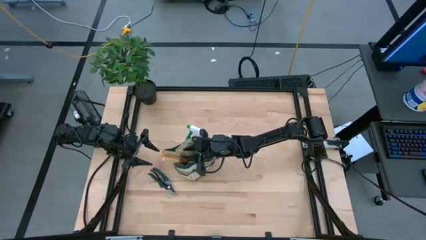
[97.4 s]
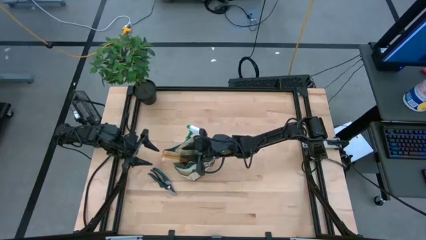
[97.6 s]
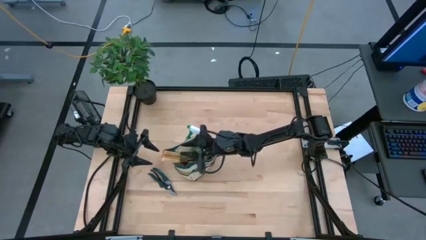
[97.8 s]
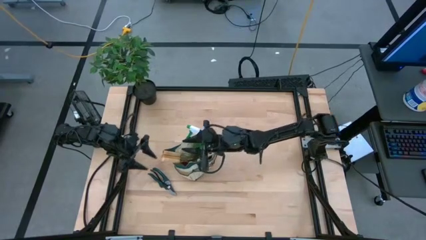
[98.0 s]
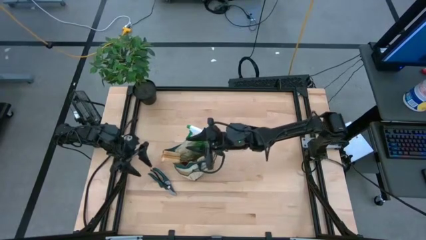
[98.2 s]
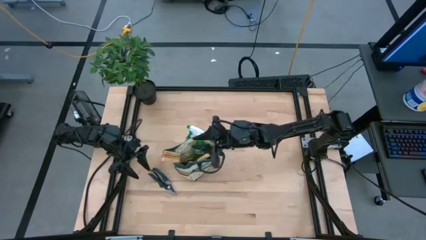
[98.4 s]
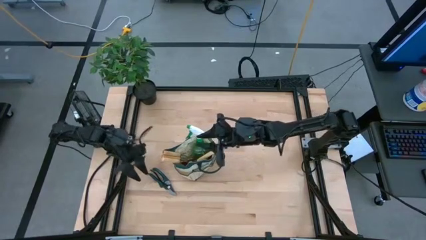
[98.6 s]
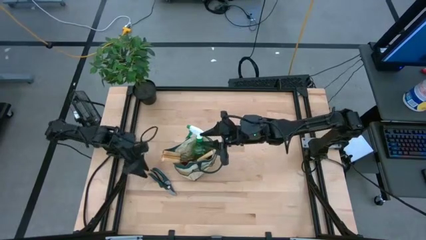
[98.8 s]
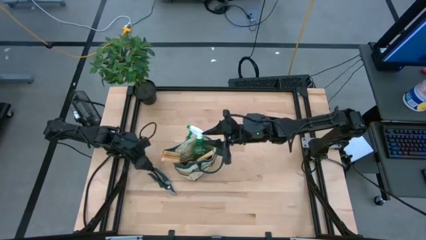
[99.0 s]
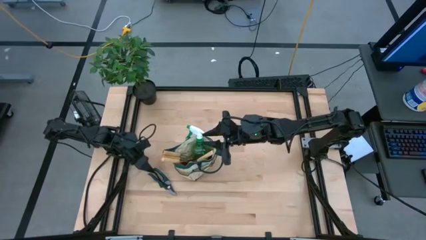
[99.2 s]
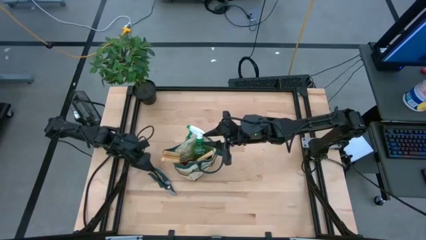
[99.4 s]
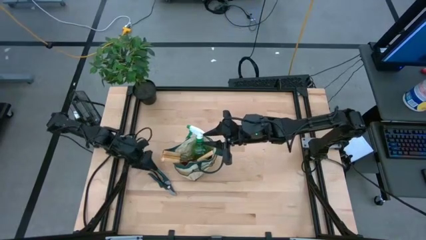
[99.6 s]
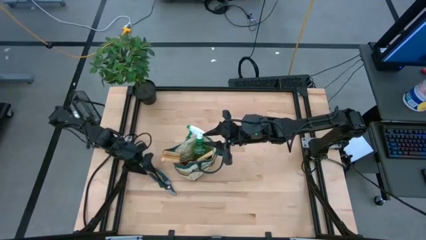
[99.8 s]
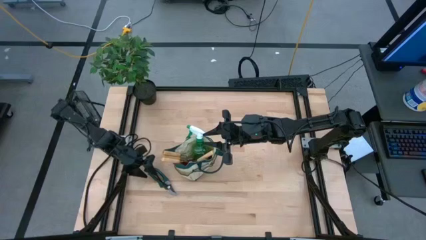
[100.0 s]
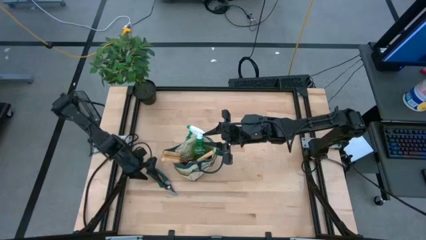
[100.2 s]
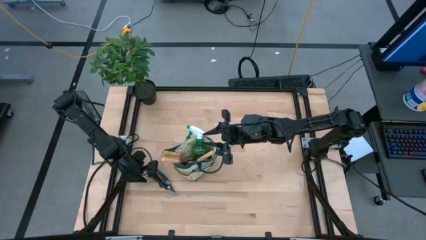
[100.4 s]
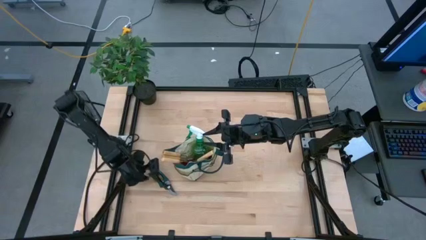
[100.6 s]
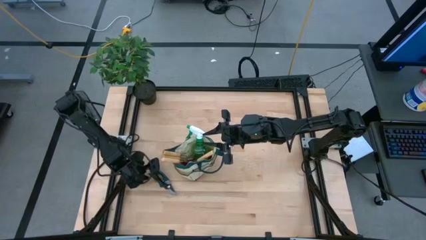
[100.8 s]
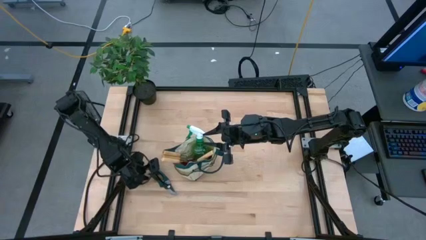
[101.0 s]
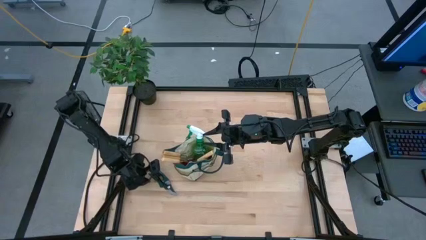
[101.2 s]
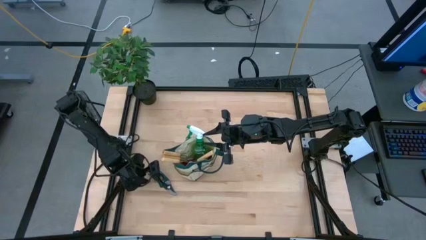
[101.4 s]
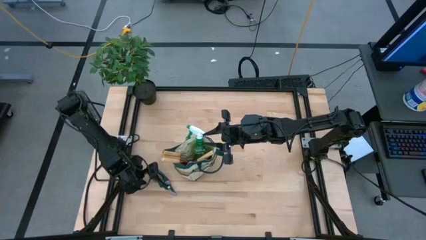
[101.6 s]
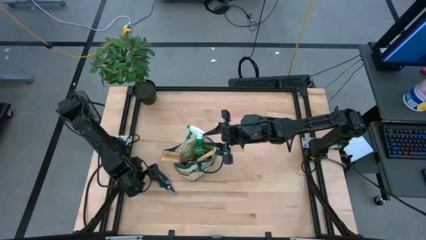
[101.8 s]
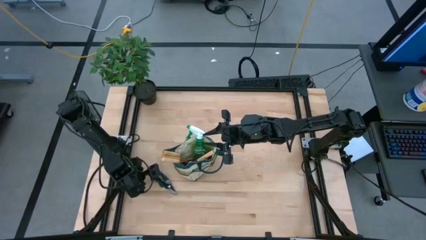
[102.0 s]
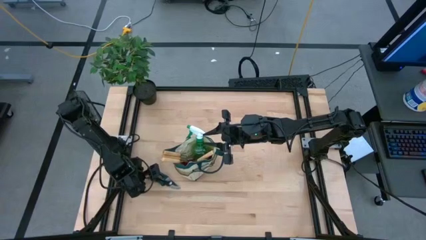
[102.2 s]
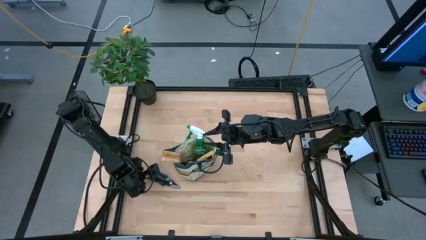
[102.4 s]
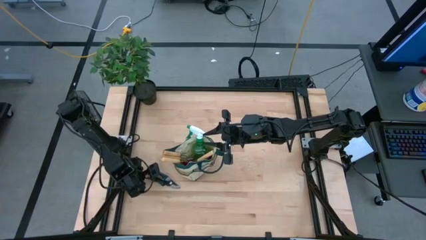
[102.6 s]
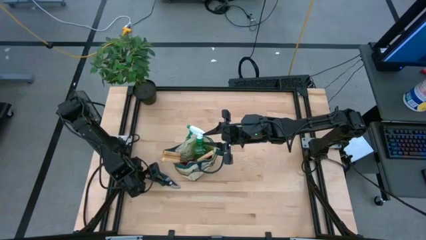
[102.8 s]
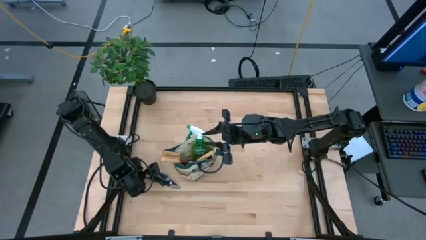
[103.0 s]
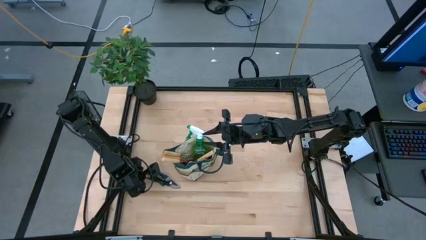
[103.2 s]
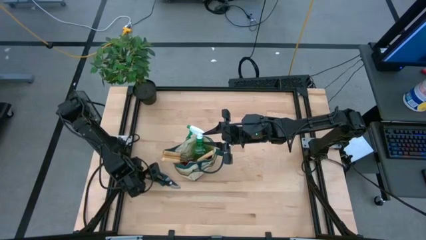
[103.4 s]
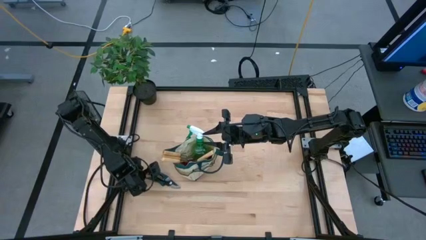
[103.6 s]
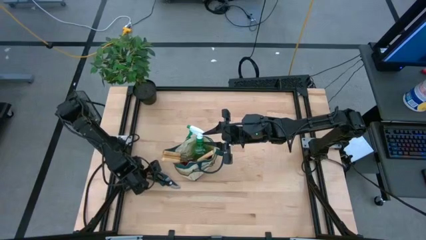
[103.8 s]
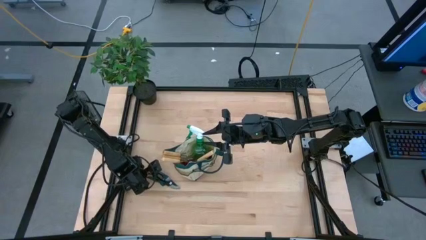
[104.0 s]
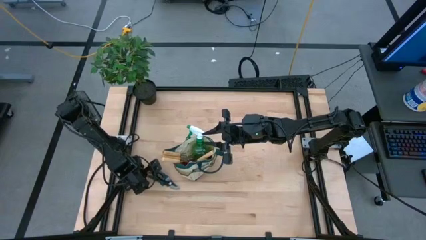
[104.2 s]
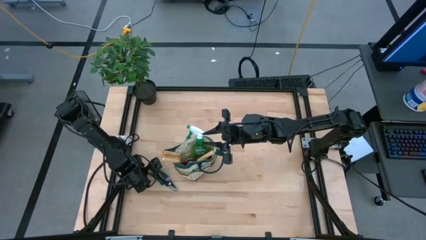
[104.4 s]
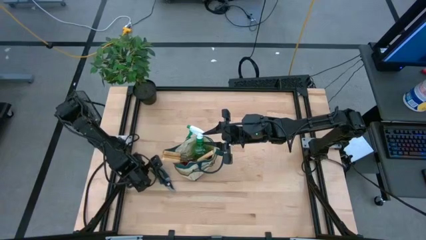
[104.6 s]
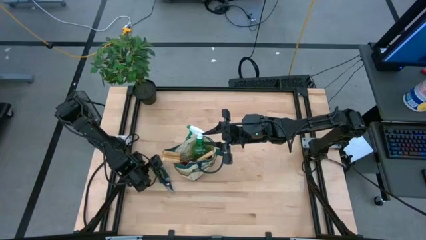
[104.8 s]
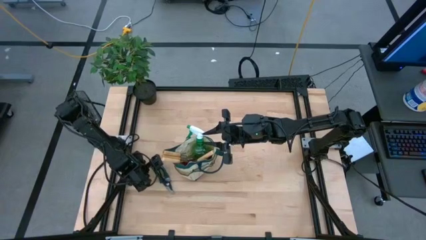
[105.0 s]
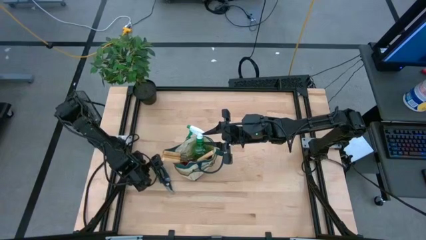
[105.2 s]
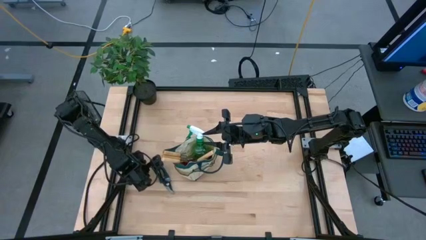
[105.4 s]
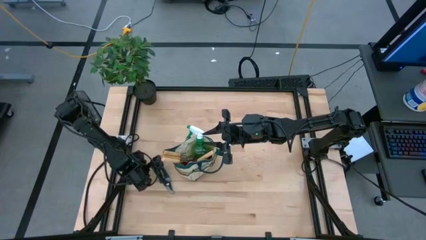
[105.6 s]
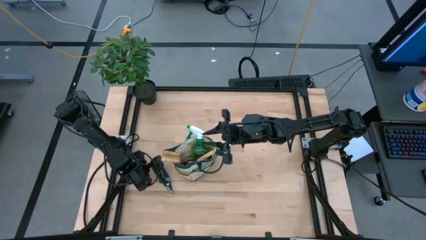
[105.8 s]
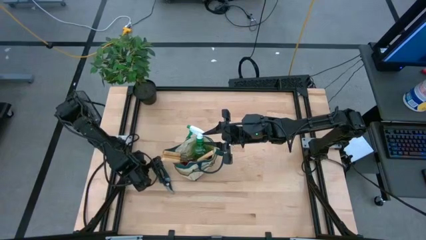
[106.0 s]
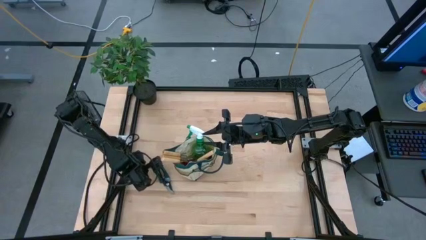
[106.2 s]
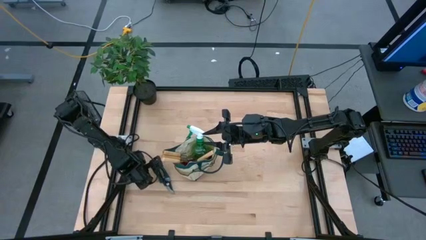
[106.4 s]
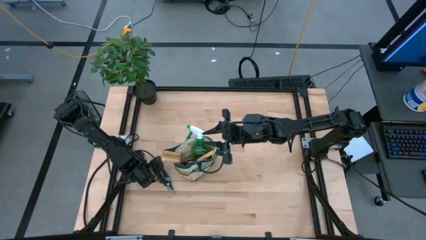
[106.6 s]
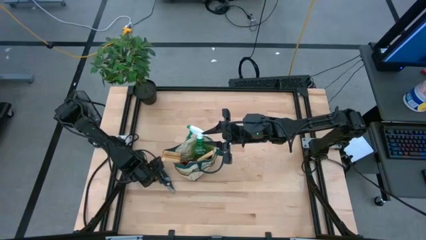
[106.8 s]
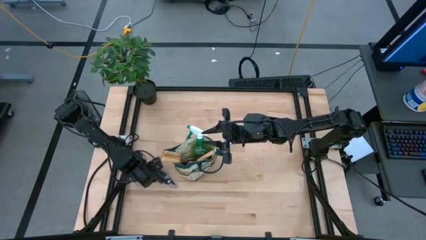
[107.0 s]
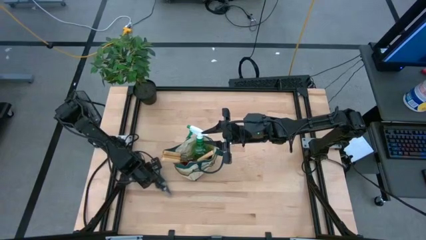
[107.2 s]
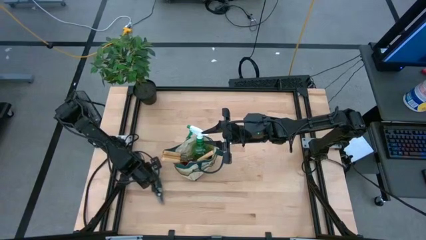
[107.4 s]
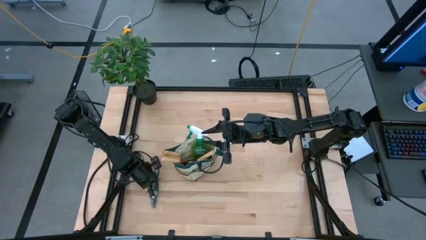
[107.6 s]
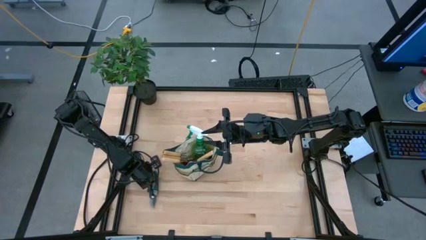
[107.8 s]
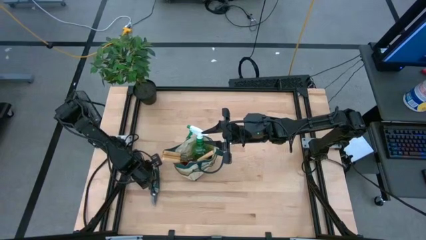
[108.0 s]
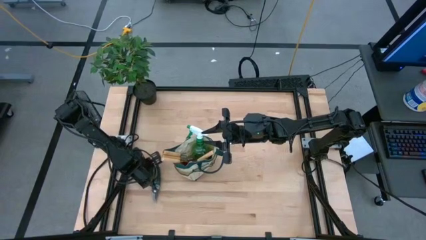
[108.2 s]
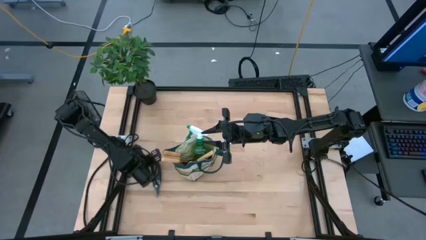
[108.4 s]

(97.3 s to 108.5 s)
Task: Pick & Place Garden tools in Gardening bag
Put the green scissors into the brown bag

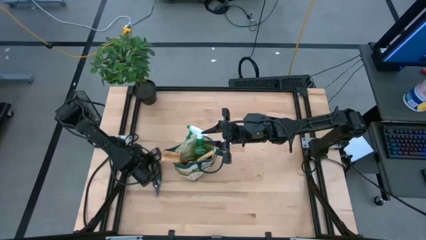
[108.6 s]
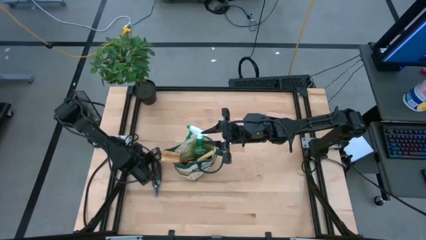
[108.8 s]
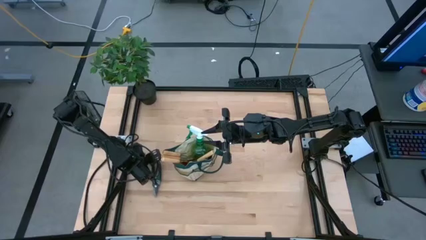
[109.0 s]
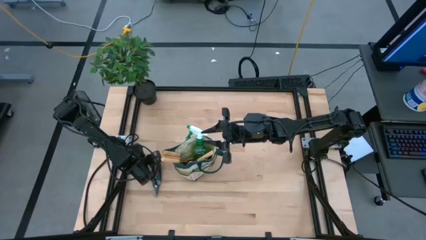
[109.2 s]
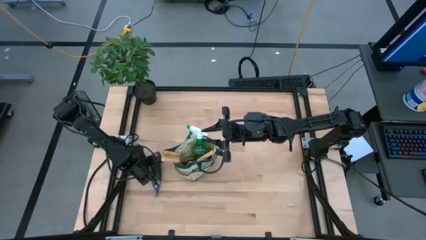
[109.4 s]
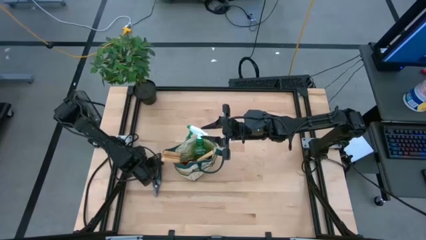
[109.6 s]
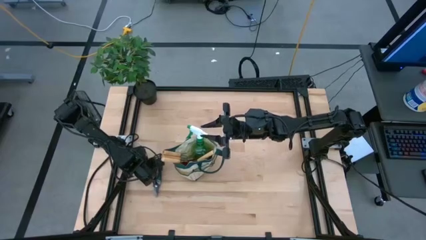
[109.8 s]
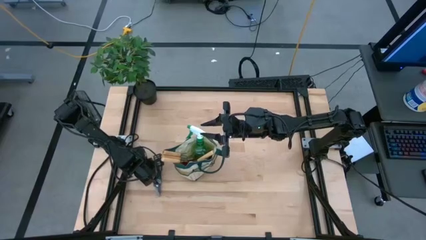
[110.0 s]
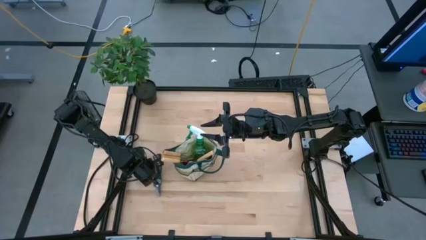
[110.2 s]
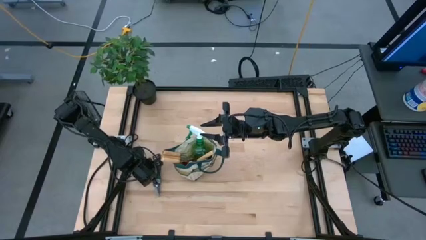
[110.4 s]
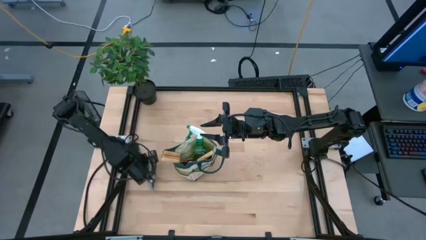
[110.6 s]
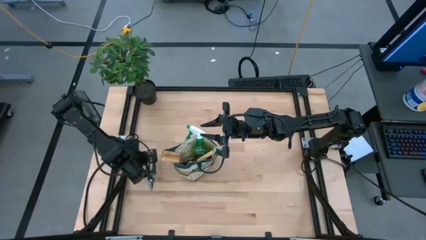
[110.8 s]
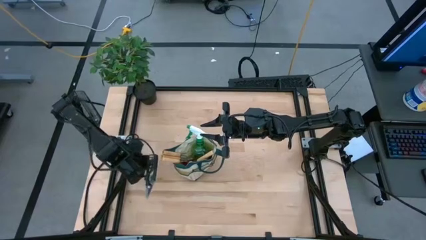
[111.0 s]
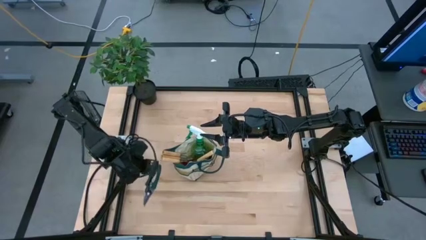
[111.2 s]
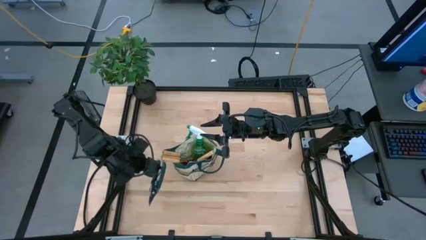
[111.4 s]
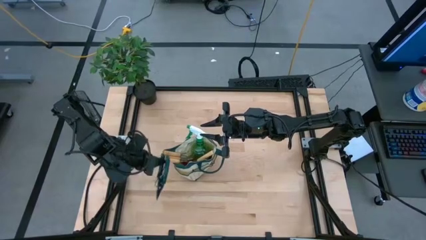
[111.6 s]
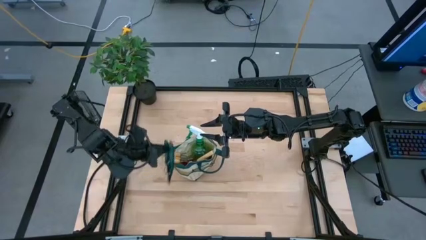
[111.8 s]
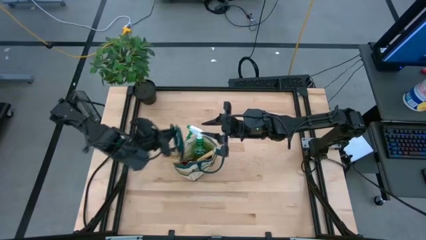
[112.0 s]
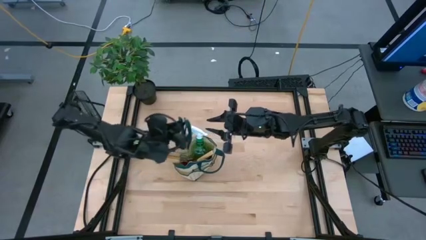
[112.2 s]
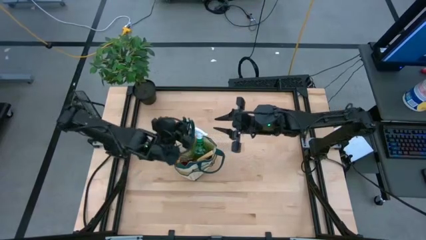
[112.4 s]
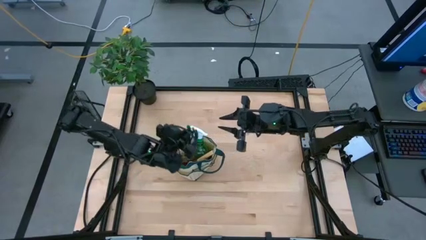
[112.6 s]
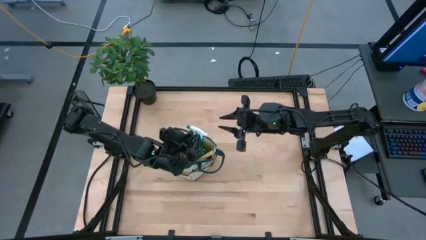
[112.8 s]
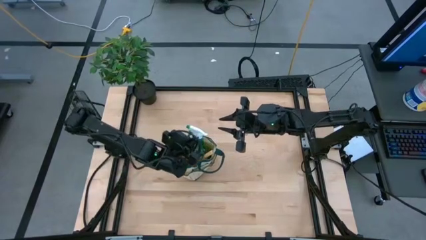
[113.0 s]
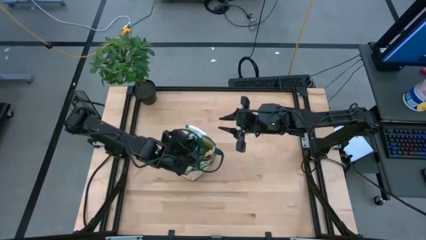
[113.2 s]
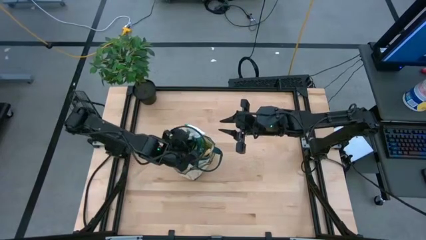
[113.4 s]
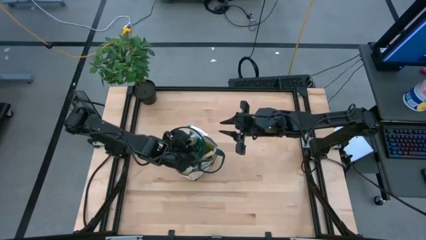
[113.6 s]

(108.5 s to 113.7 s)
Put the green scissors into the brown bag
